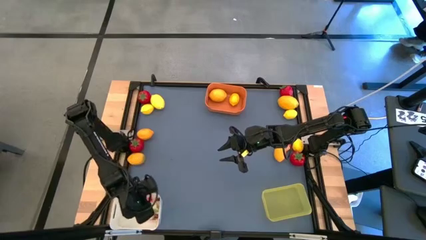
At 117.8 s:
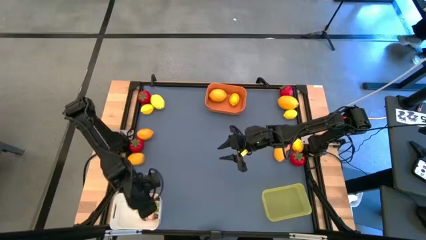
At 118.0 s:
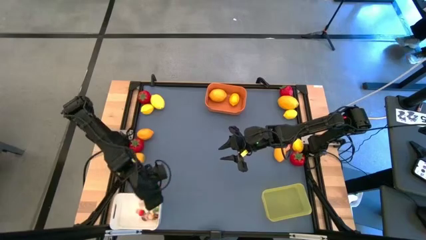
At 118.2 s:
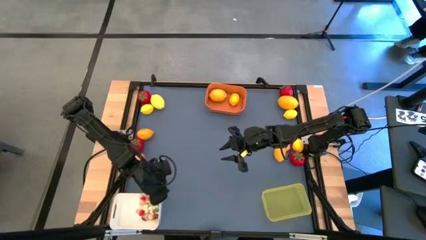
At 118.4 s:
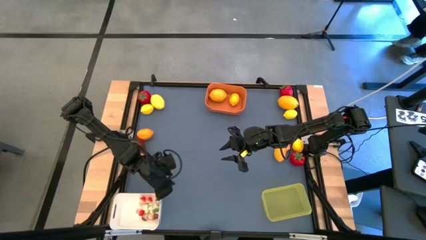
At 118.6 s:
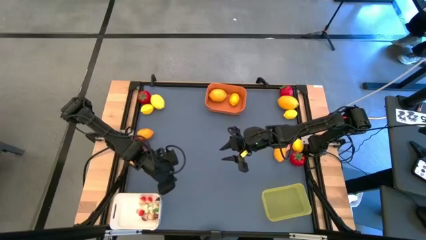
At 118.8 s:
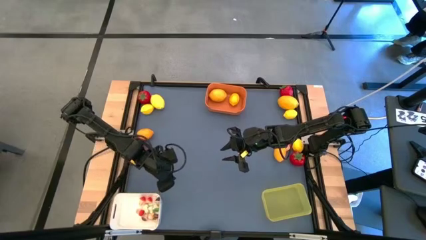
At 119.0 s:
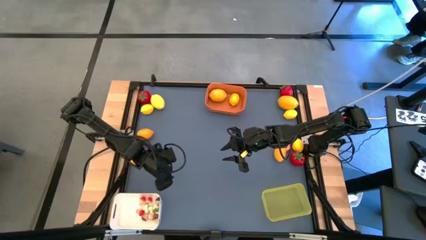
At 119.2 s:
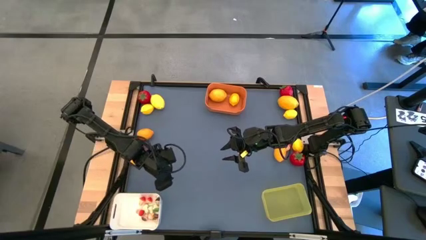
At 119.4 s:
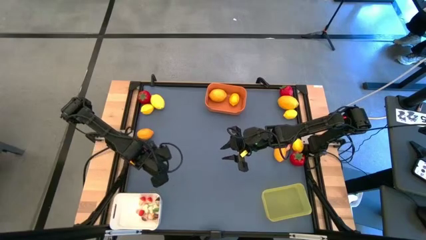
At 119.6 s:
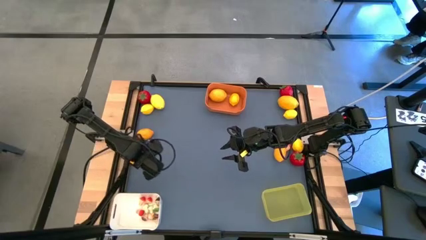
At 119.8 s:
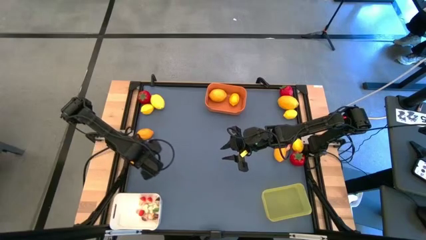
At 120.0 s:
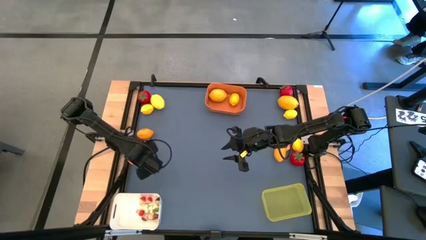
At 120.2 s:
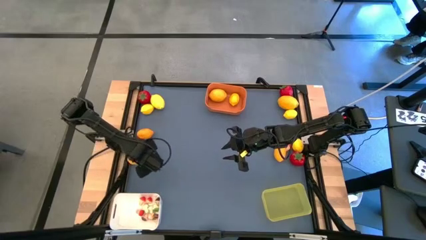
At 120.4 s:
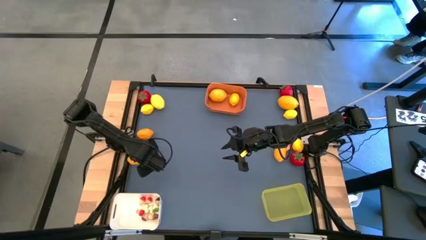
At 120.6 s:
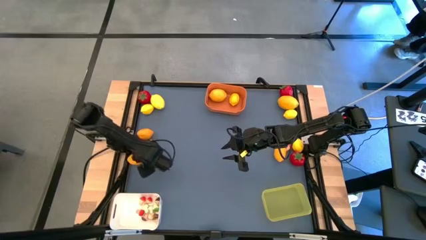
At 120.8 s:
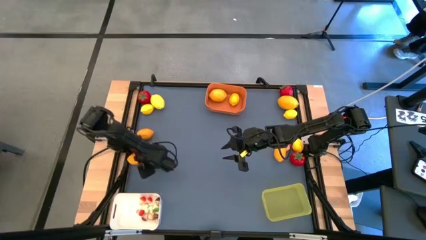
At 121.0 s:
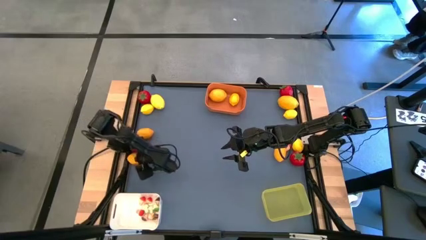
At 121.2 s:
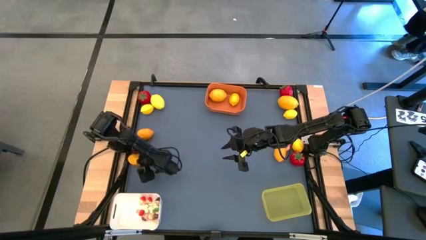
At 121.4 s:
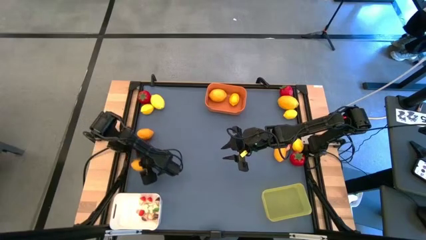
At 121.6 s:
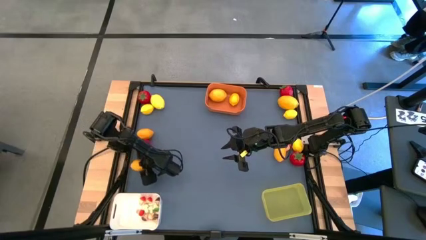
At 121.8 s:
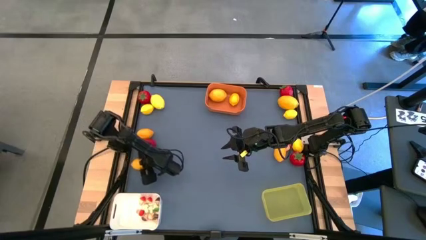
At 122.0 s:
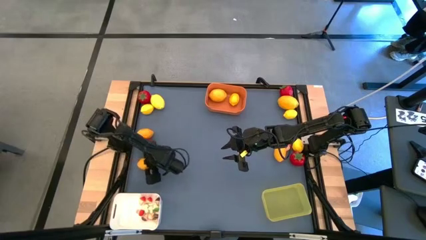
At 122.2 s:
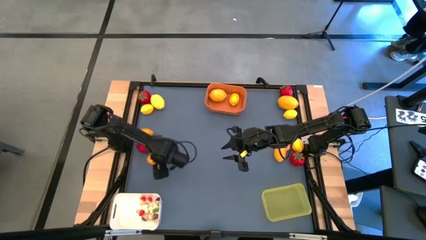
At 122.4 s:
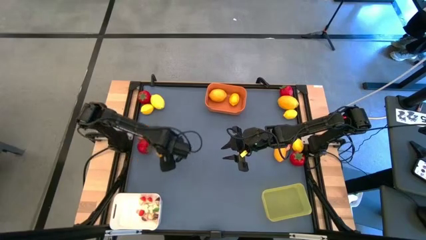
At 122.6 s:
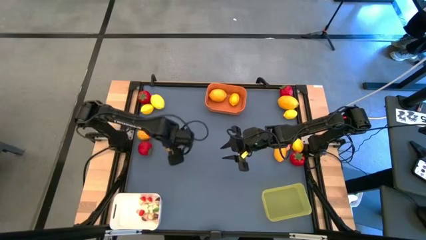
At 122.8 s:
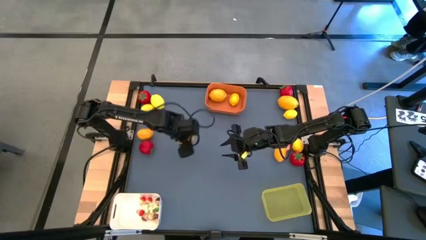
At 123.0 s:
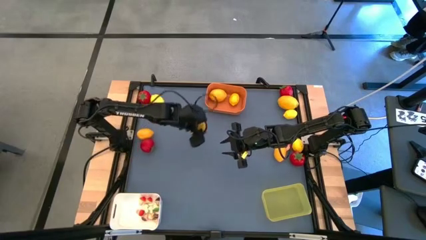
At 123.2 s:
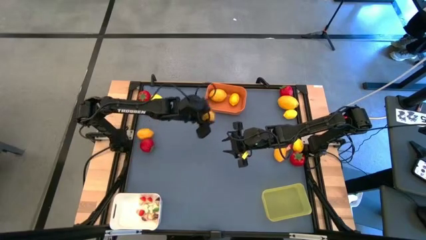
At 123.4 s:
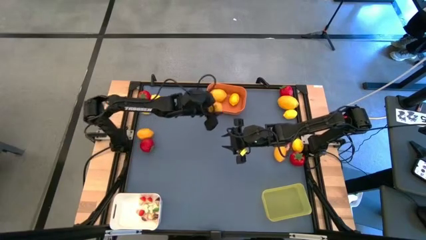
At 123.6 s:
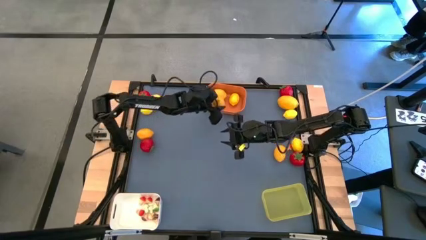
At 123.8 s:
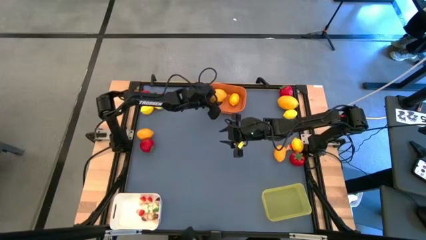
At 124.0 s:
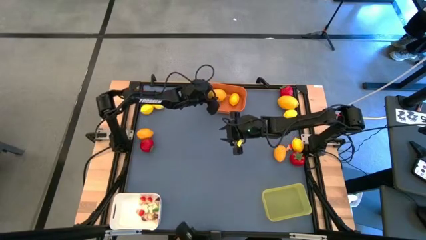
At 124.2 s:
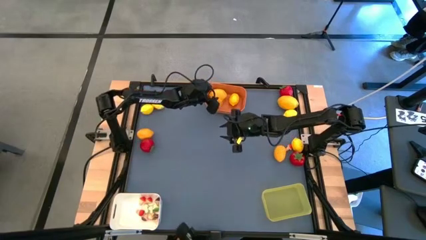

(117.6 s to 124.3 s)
Task: Sort produce into baskets
Put the yellow lemon into the orange bin

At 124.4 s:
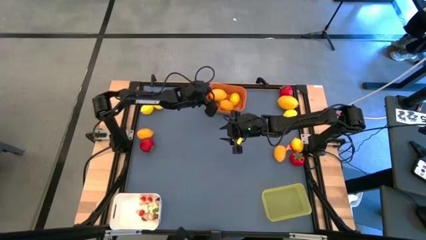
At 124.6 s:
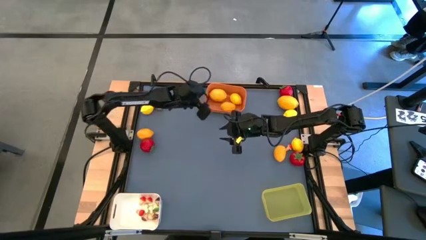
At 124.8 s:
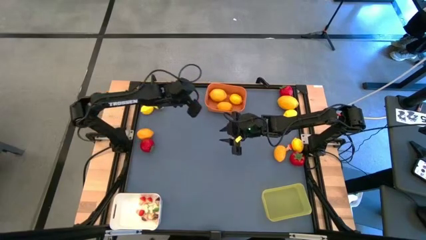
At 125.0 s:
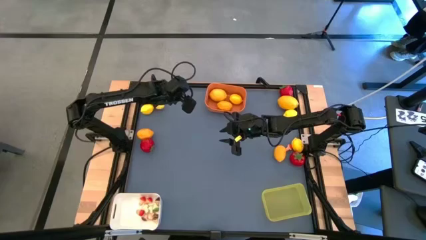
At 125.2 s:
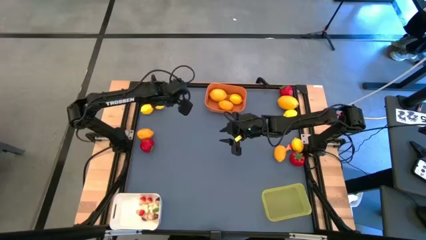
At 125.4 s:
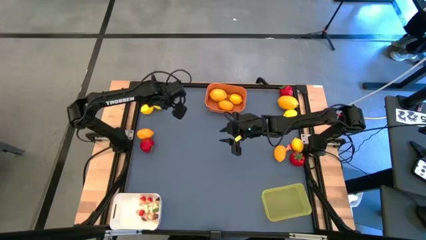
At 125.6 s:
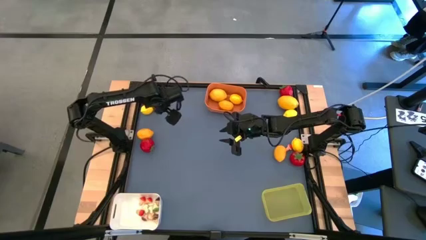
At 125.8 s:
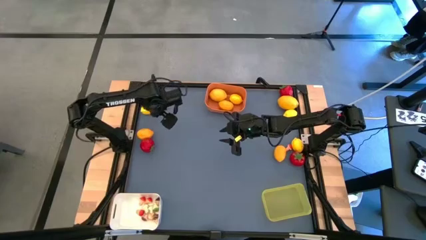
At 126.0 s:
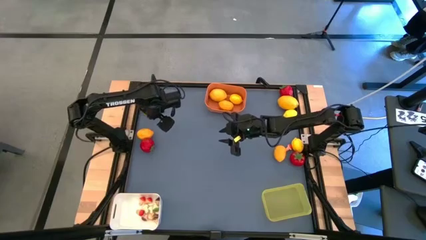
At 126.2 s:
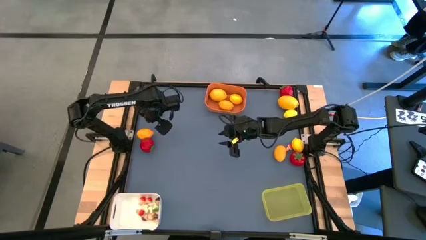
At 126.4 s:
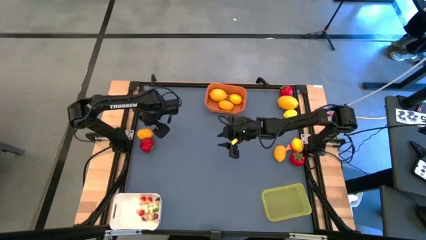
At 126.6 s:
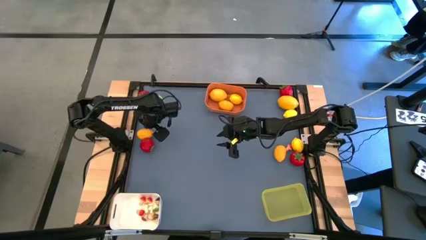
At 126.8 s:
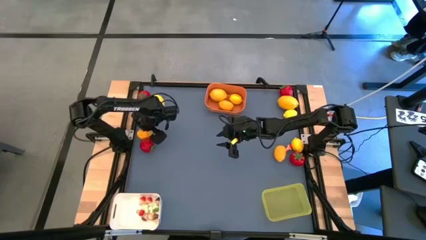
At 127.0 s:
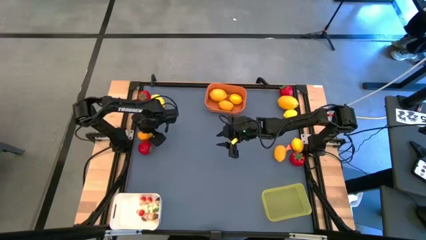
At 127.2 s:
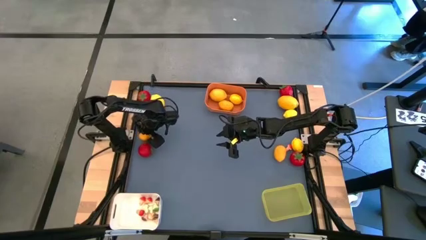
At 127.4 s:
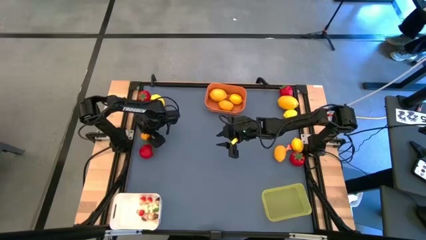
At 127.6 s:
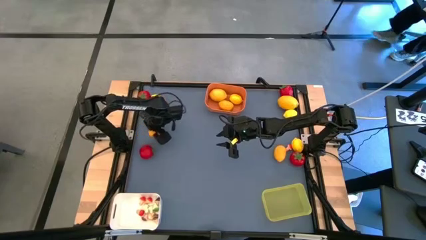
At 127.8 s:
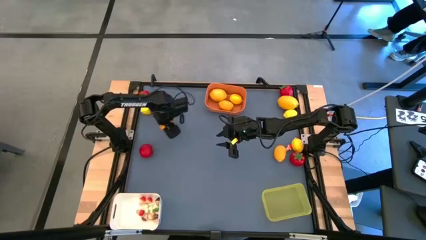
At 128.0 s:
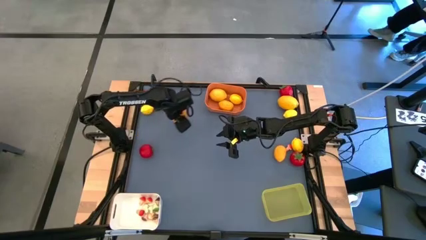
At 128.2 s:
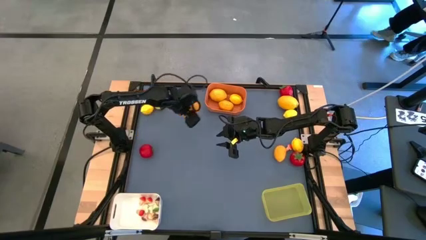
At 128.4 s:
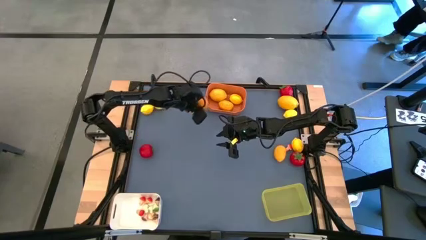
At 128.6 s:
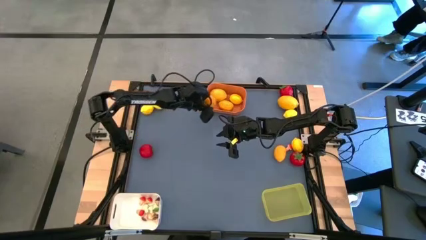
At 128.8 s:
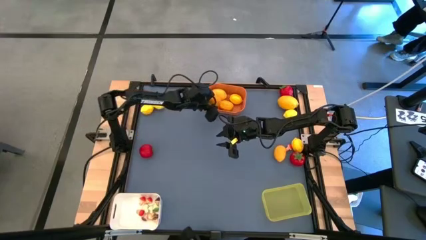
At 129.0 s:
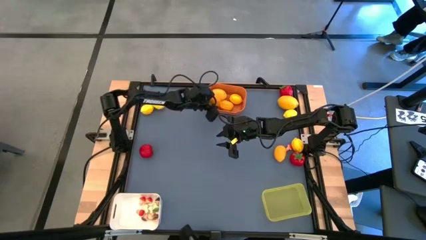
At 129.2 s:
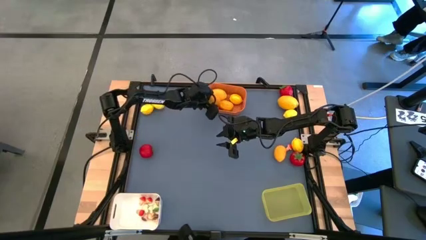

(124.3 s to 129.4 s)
Put the yellow lemon into the orange bin

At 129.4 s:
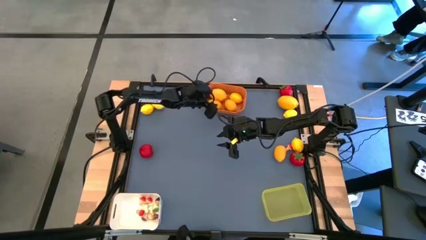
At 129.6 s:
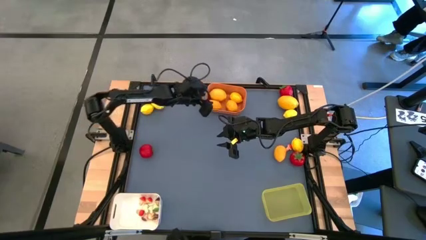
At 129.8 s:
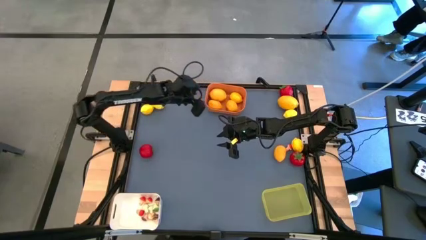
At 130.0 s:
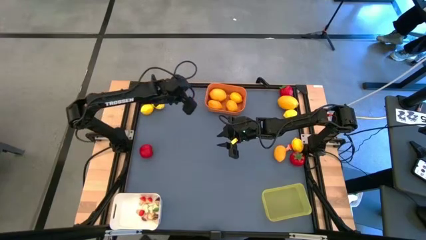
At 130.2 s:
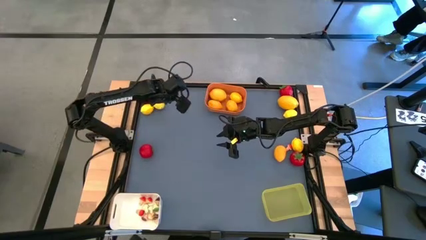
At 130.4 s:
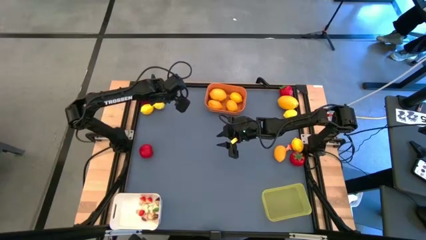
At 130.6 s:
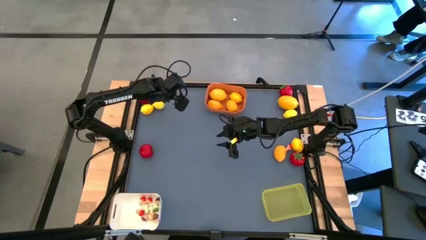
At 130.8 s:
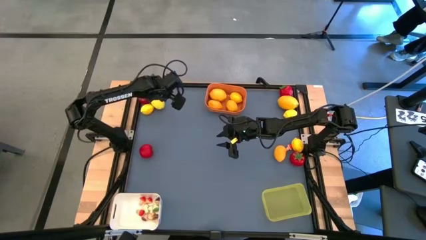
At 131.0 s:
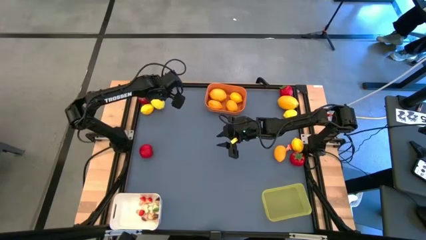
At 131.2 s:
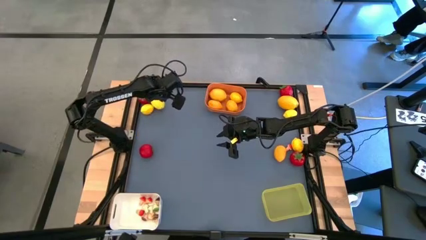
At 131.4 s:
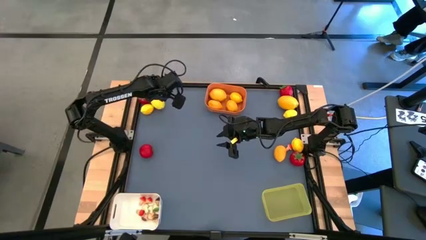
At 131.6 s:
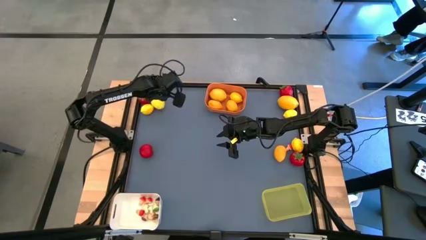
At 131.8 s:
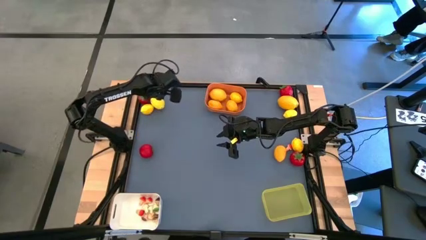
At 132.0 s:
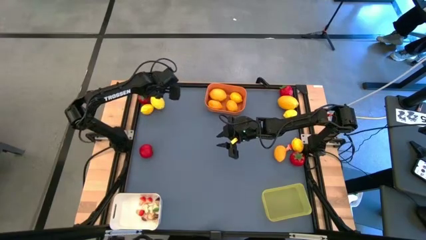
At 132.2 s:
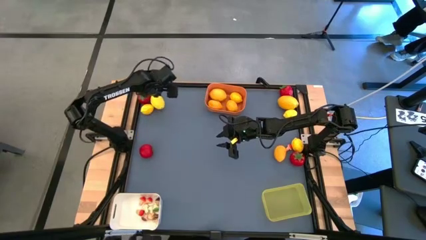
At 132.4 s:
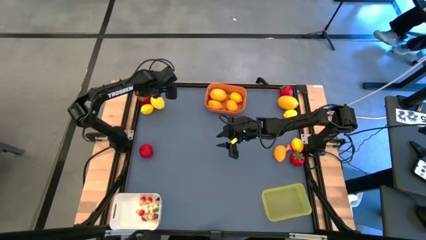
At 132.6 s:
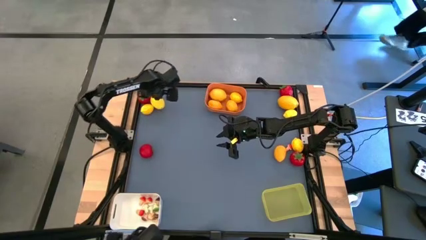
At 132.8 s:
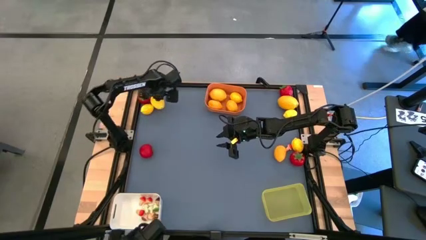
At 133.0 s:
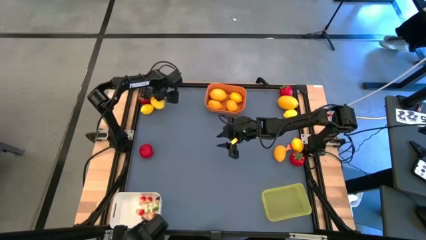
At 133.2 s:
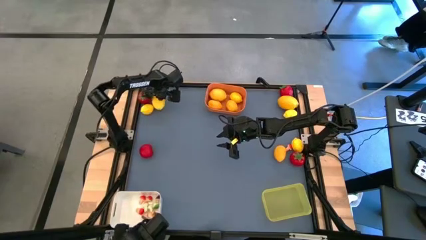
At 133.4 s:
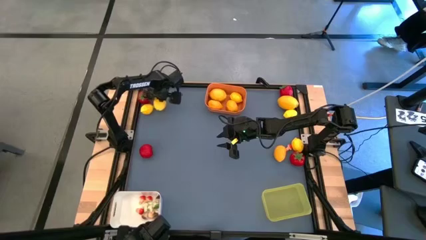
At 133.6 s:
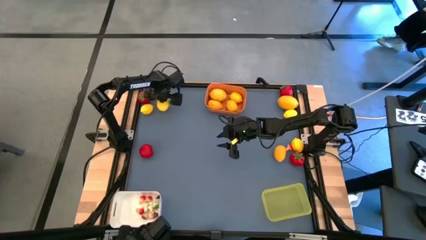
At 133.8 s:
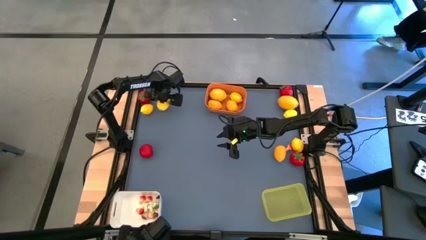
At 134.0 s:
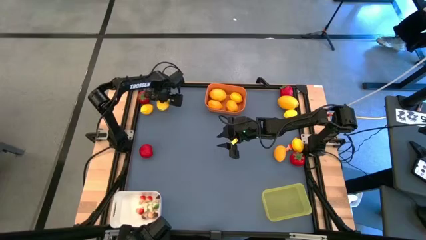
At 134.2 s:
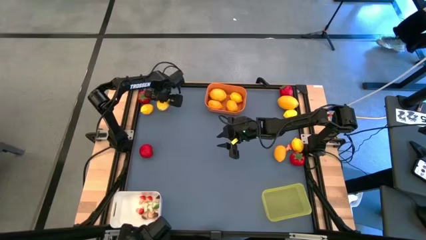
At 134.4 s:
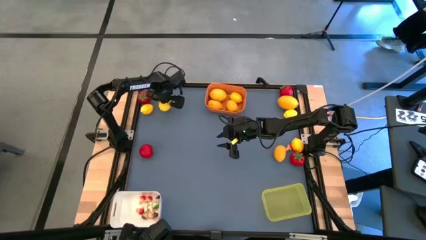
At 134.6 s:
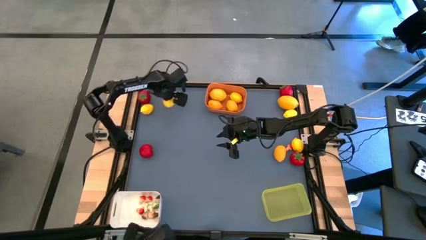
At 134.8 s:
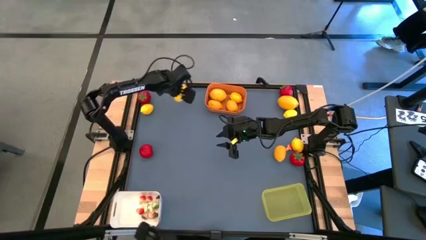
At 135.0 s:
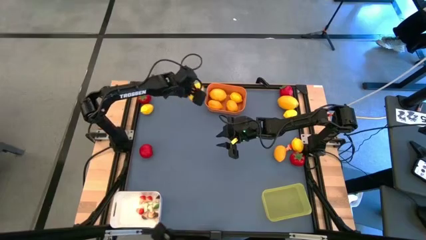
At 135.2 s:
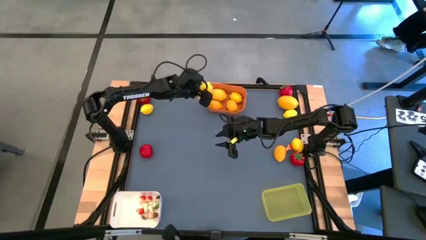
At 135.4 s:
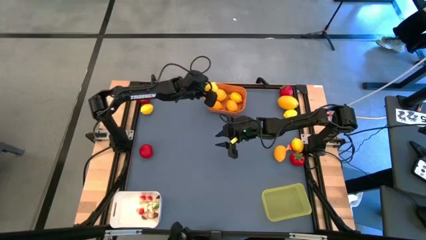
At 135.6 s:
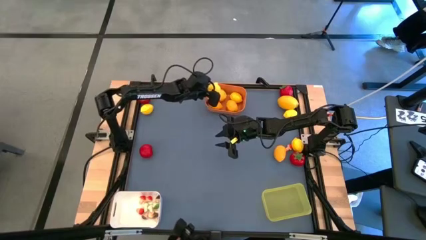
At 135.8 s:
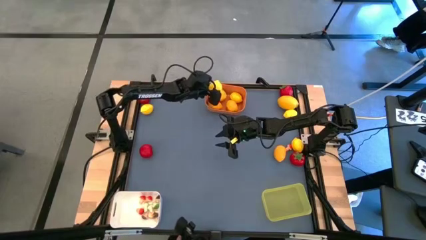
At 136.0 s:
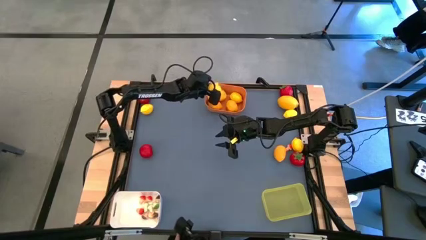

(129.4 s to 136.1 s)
Put the yellow lemon into the orange bin
